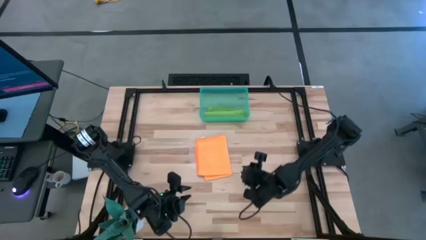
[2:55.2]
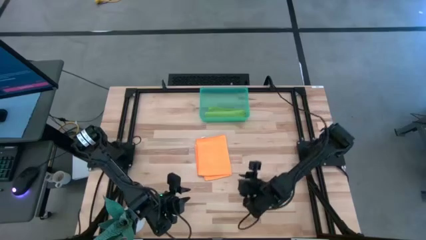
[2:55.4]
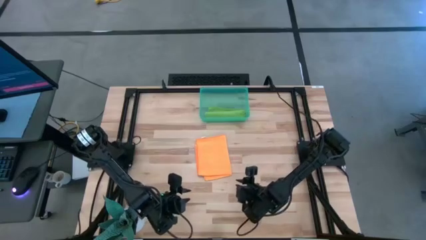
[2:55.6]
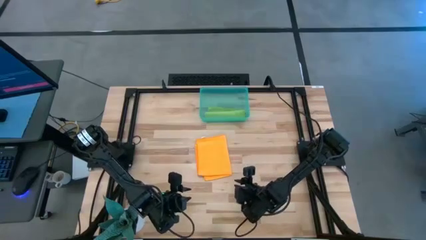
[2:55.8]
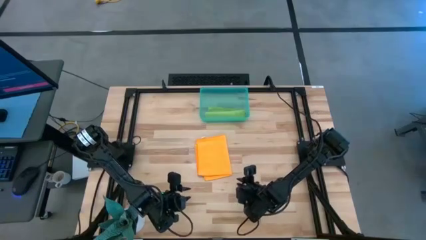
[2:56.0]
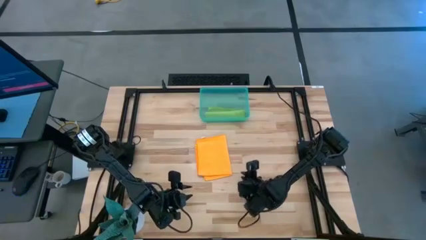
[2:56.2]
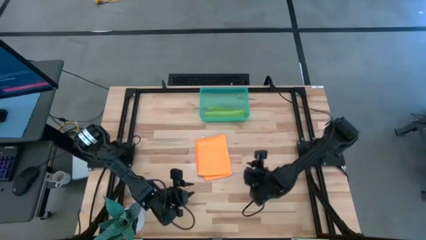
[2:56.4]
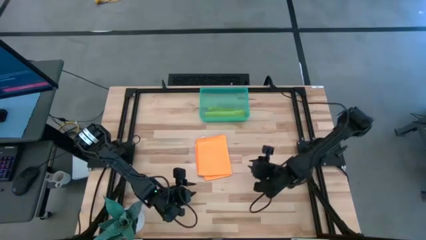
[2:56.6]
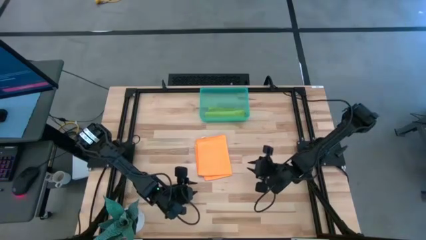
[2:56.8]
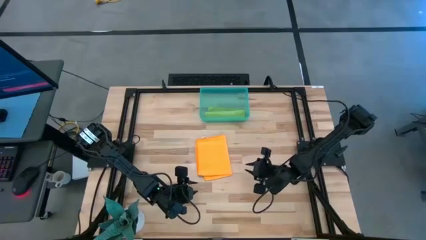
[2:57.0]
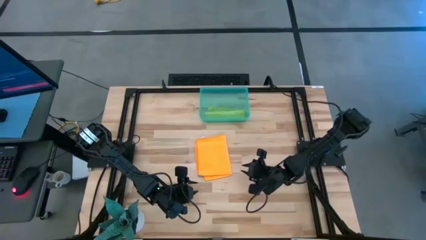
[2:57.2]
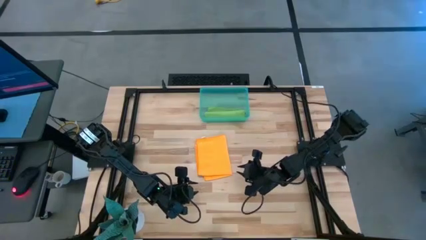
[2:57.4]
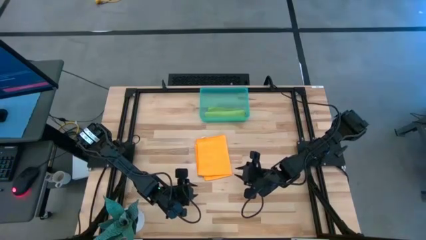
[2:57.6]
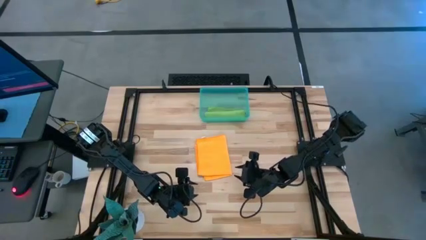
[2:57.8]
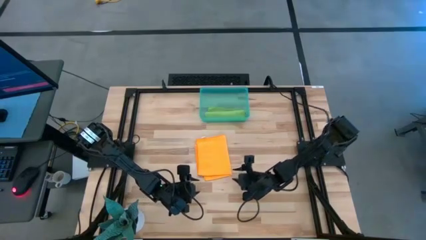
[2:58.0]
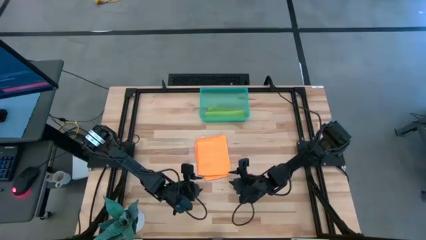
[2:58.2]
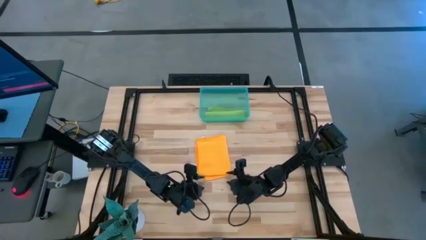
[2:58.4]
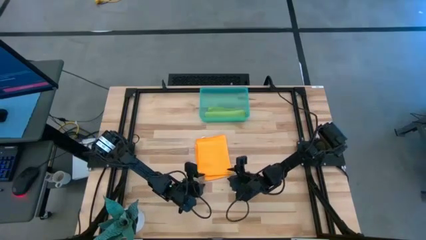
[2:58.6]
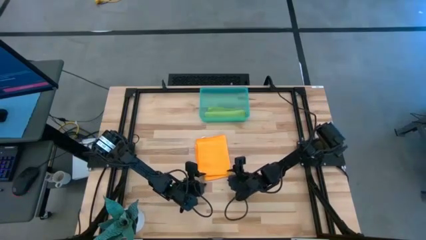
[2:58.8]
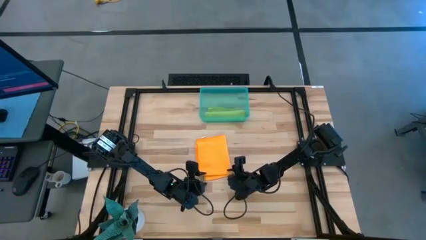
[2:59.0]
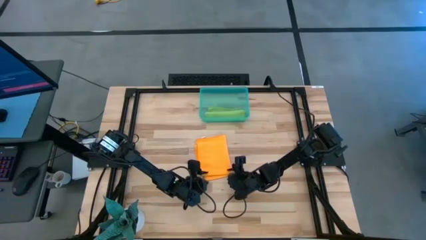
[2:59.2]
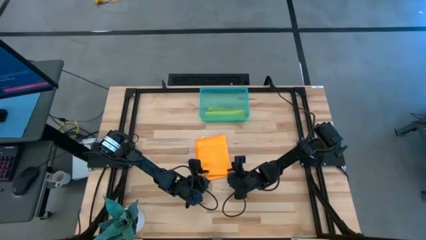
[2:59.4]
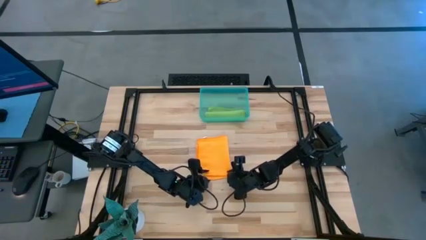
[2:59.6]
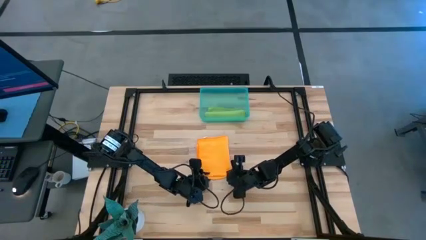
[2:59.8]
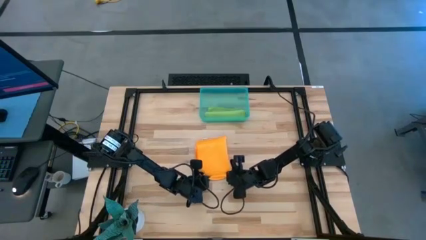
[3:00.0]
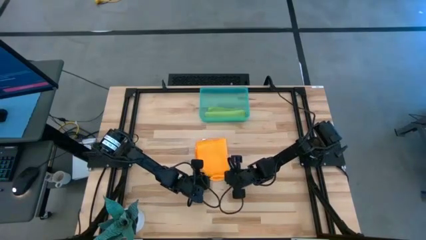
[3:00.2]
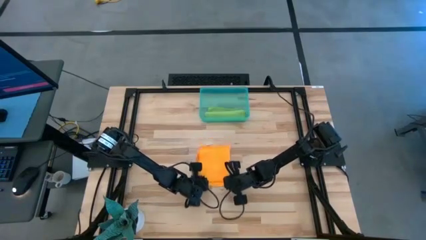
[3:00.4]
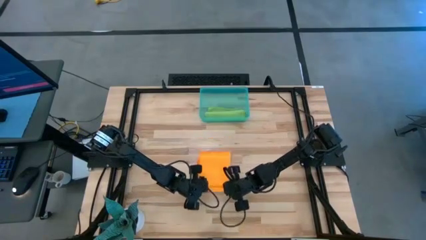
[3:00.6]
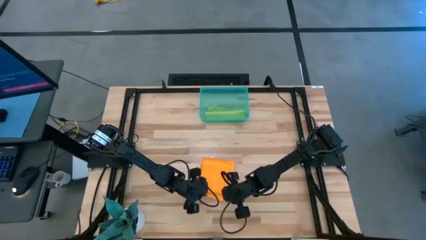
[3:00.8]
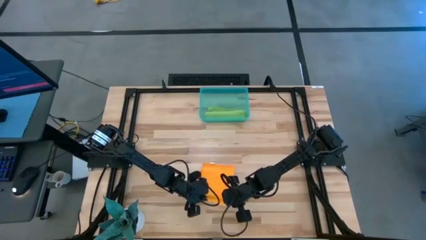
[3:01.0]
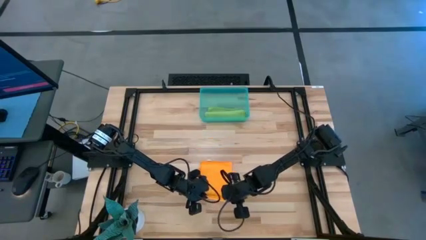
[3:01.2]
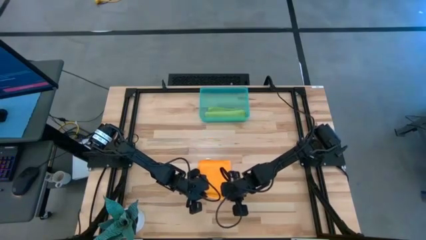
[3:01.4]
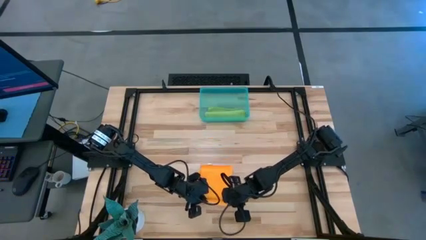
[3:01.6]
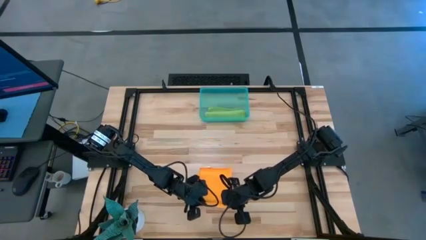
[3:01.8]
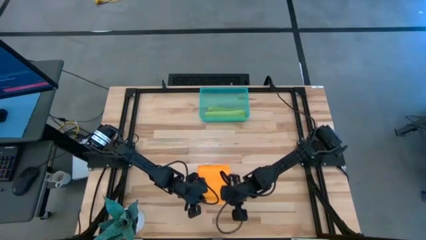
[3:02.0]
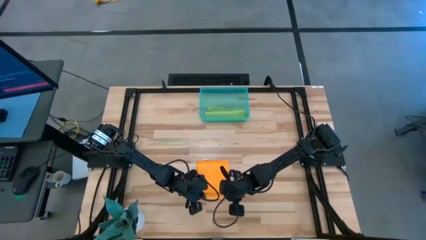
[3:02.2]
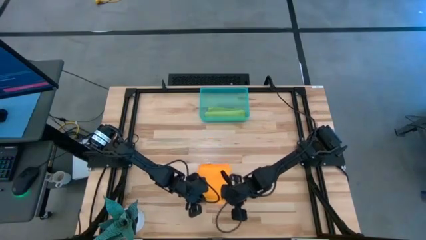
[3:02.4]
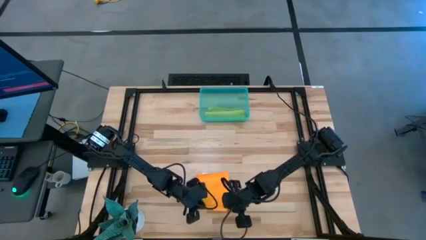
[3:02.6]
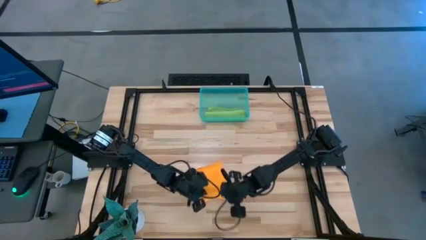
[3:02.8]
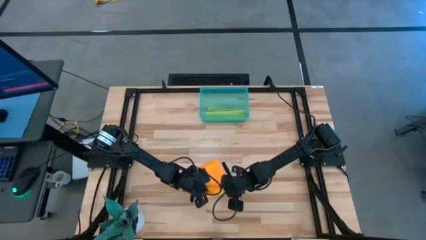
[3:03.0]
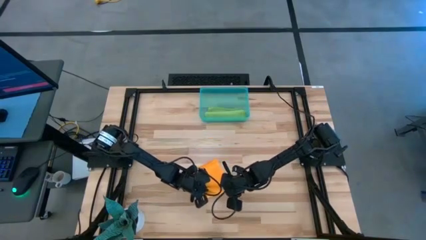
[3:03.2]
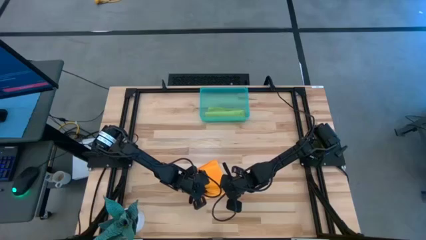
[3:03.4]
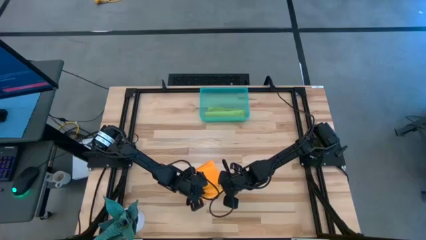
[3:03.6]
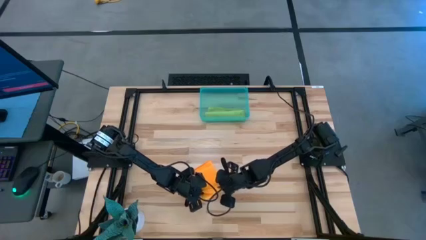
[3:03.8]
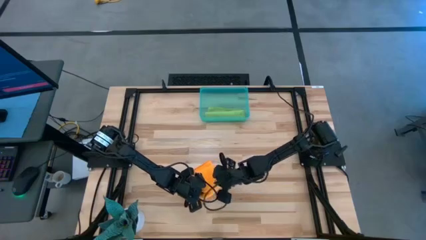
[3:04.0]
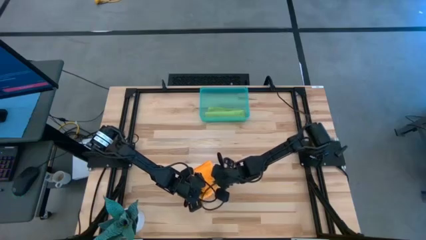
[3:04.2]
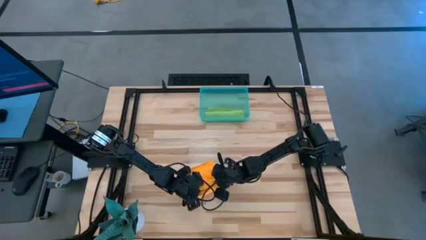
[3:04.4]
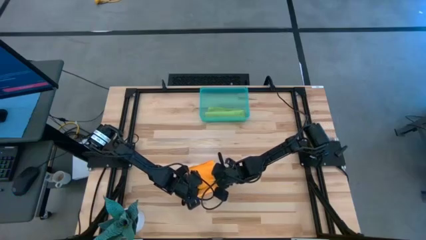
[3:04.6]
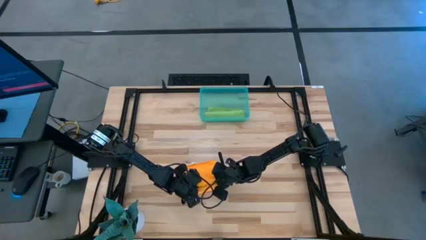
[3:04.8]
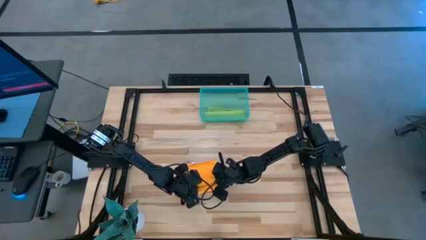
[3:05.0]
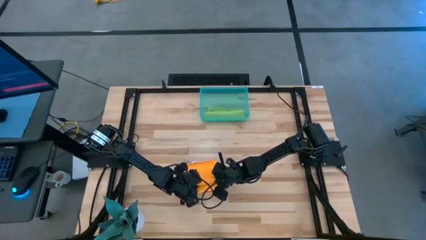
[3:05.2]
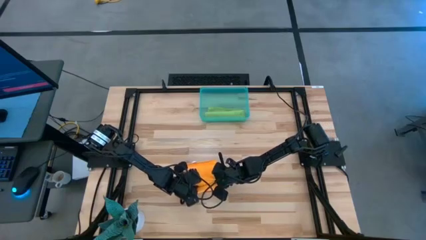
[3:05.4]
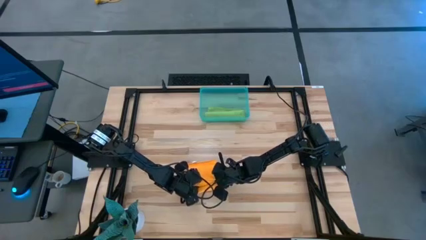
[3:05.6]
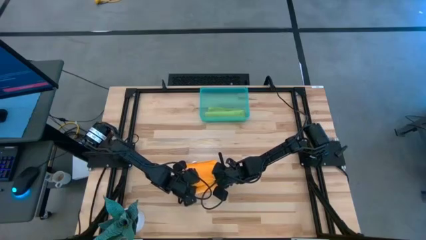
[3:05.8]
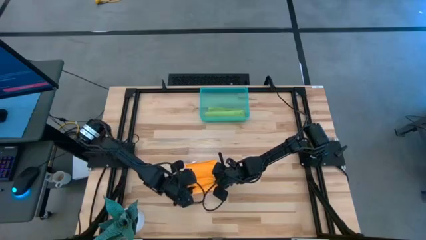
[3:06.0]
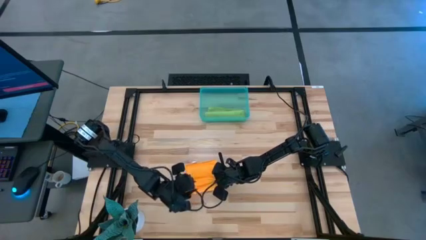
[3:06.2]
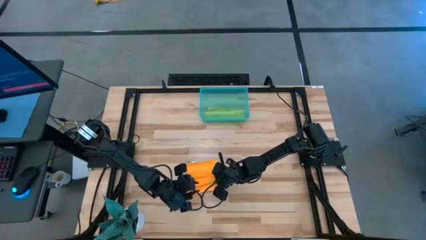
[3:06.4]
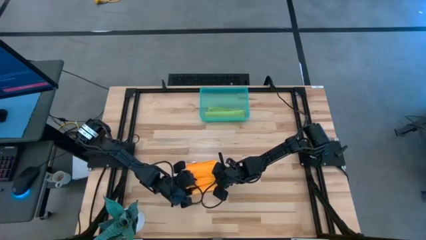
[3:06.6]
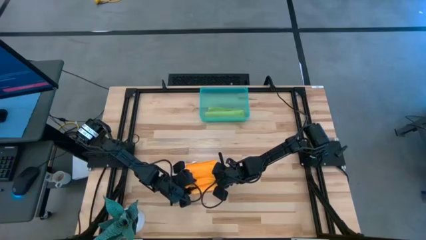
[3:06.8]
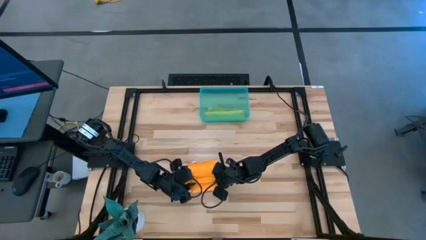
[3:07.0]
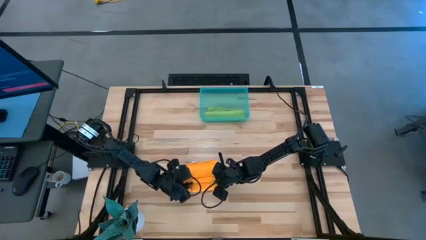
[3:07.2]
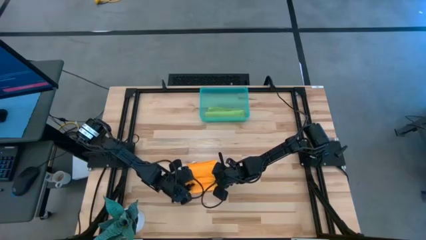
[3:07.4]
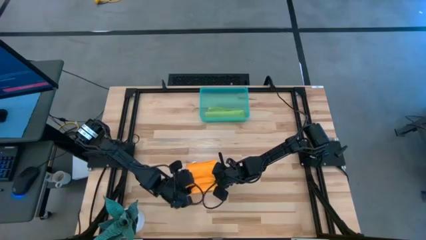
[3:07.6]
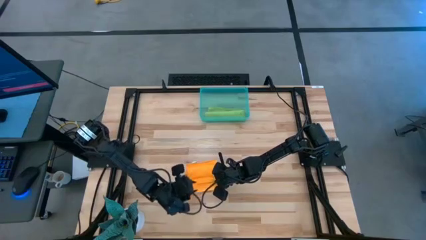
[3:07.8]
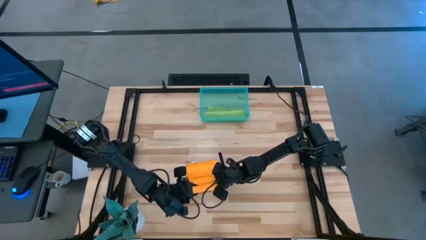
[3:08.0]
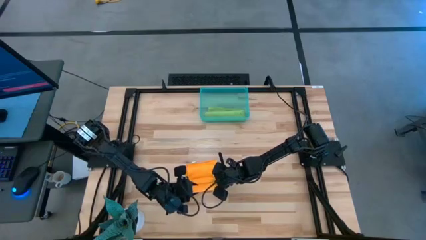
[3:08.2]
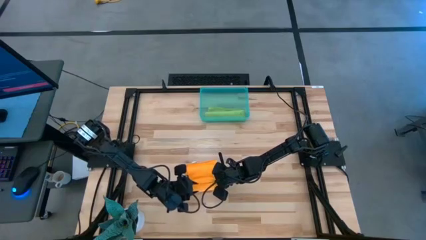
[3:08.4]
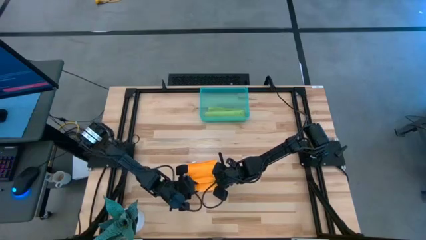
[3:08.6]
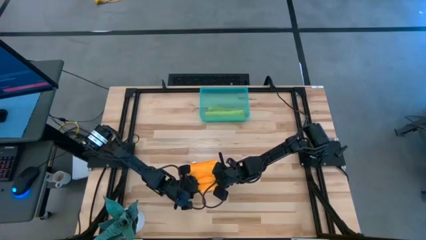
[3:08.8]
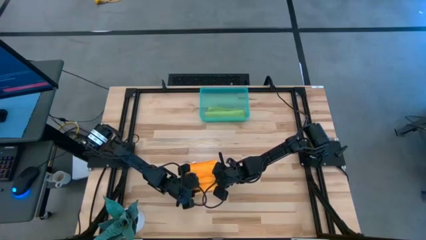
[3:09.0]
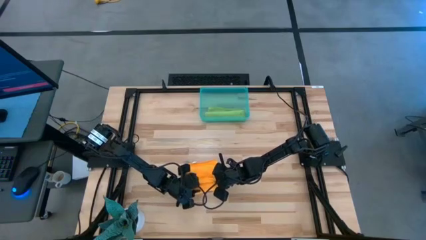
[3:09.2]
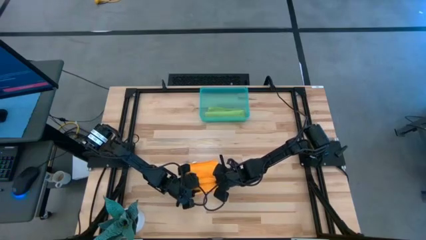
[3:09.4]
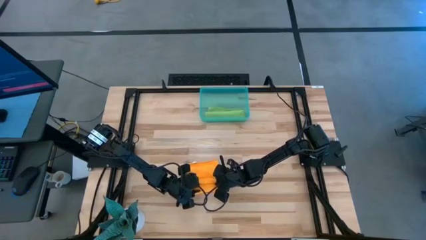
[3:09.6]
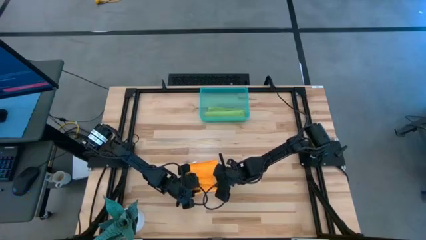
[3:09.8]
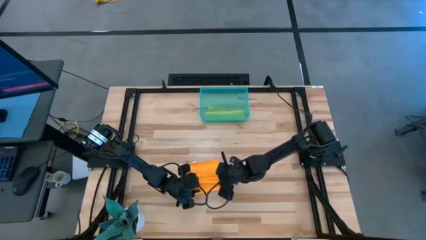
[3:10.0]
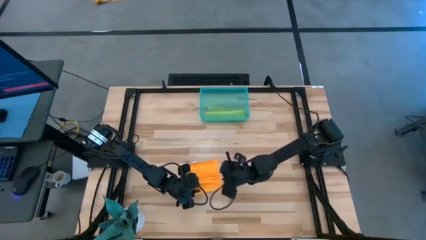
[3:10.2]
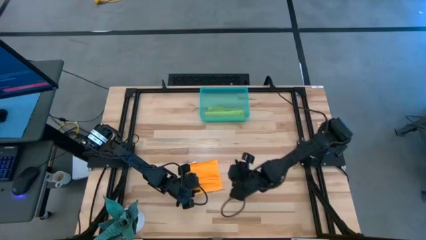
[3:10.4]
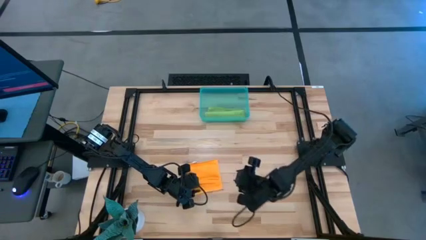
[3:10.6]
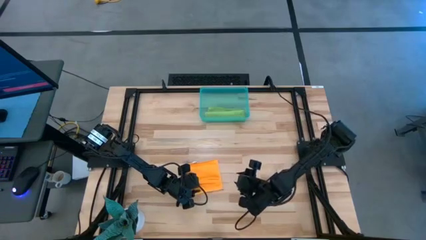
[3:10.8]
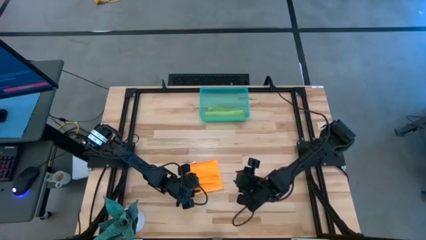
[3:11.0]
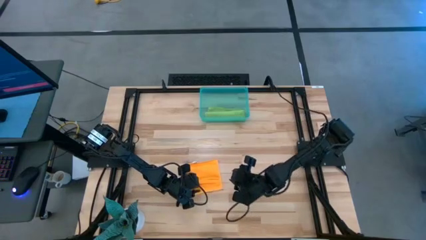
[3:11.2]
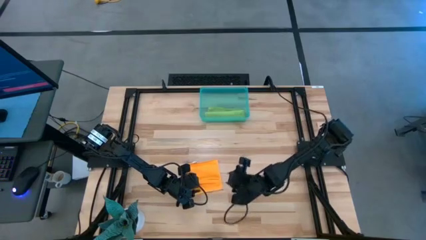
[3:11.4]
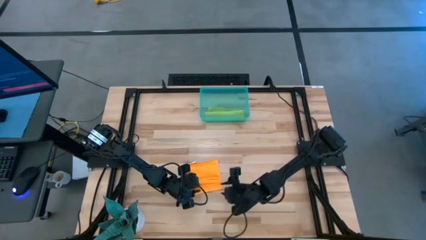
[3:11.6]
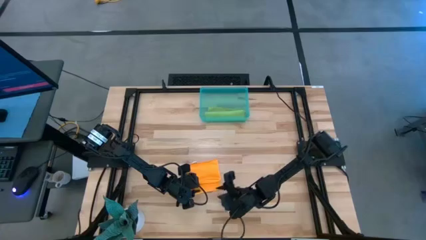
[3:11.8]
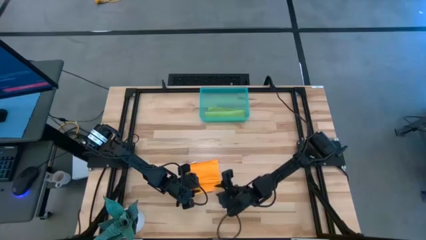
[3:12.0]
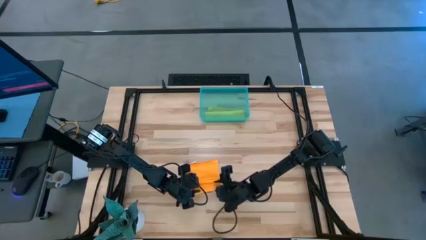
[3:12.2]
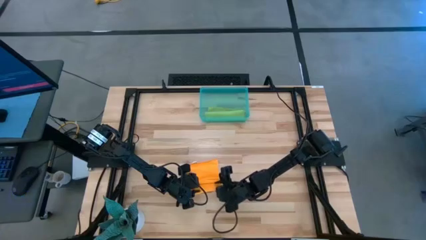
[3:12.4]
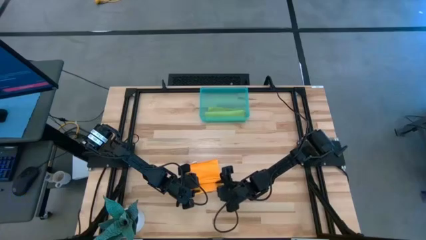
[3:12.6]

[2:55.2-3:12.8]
Task: Roll microfiber towels into tight, uniform cylinder then place into a basket
Roll the yellow microfiber towel
